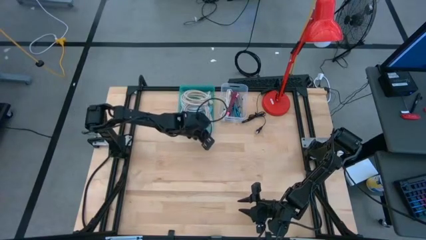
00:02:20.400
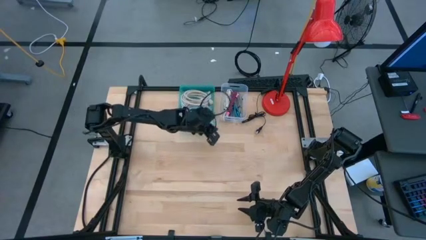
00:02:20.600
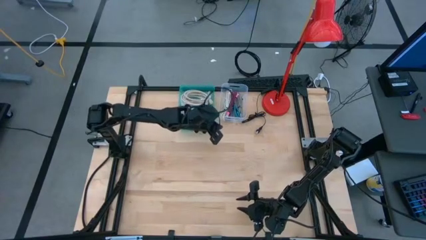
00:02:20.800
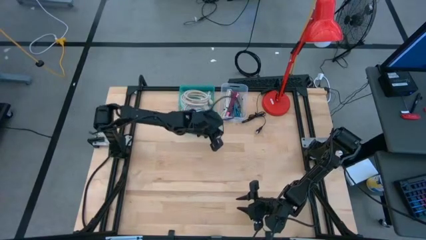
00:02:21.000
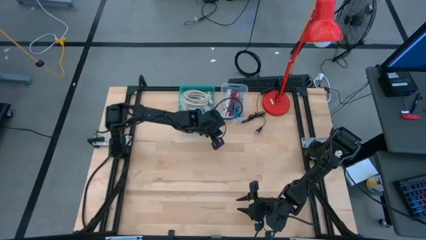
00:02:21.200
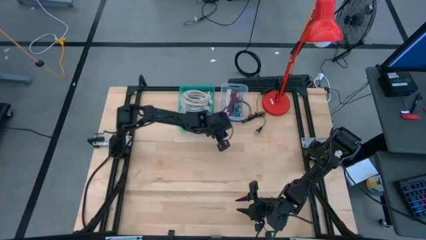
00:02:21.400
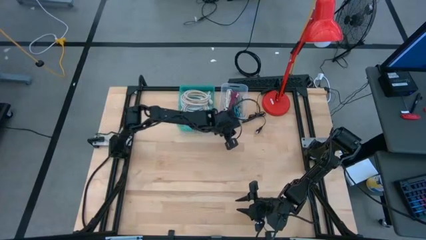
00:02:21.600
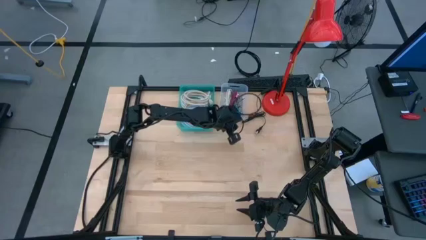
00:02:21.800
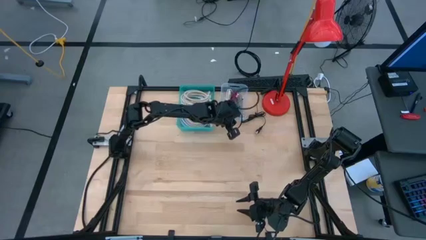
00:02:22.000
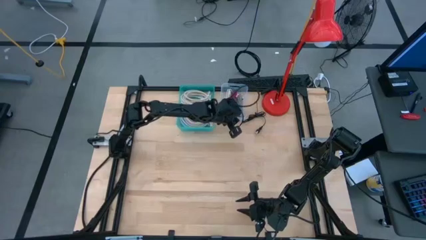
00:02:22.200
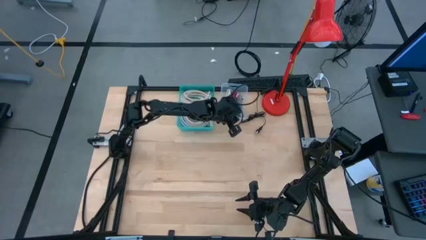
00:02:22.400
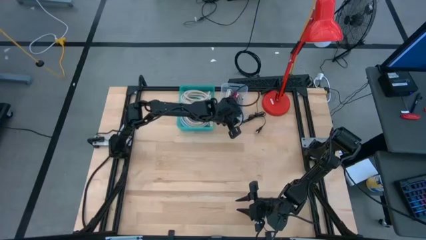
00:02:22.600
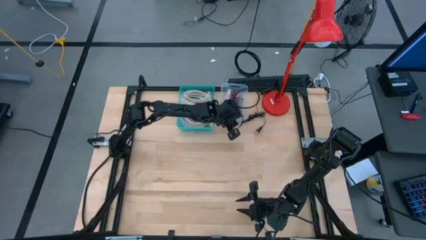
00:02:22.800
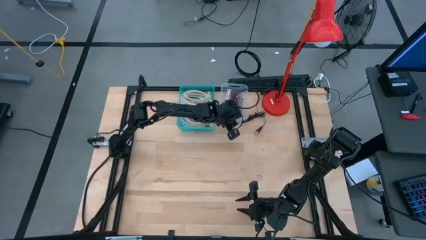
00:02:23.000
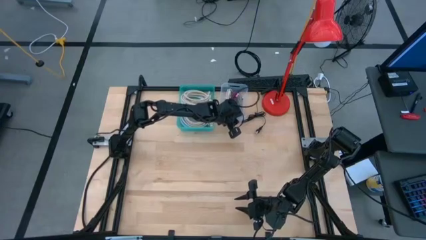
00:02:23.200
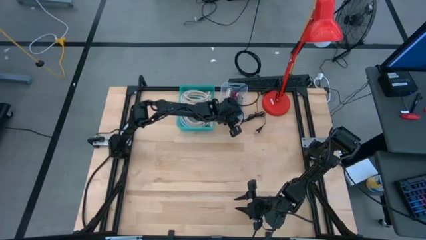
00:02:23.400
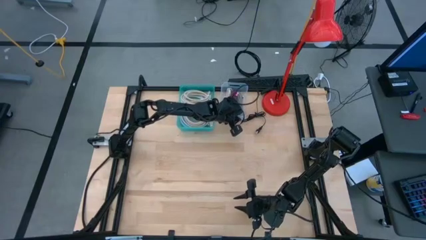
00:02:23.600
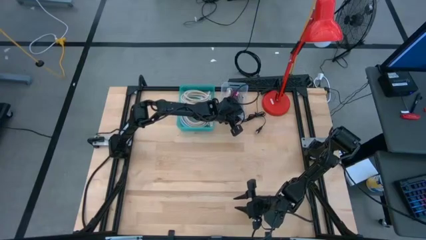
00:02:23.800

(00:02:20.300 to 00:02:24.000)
Task: Pick and place items into bin
Adjust the transparent bin

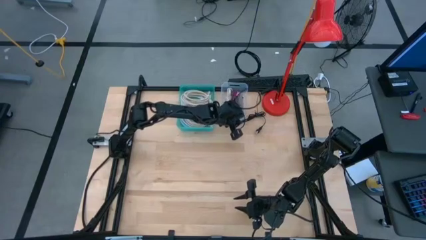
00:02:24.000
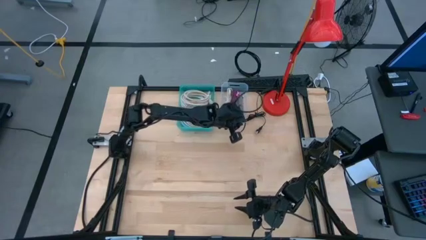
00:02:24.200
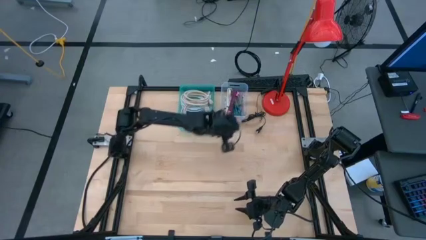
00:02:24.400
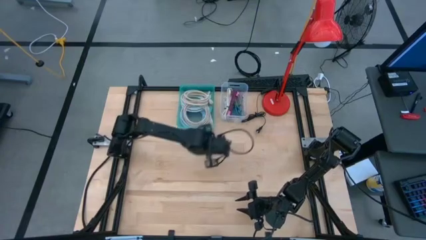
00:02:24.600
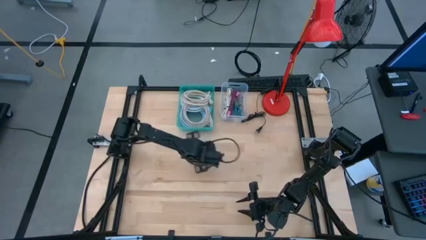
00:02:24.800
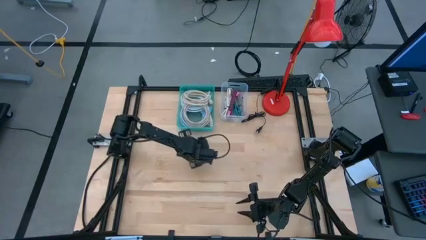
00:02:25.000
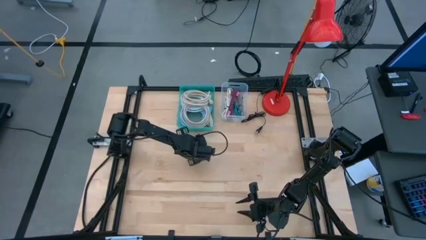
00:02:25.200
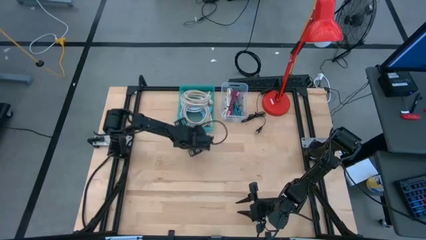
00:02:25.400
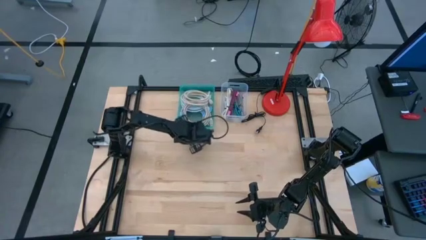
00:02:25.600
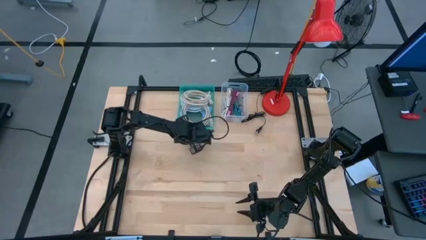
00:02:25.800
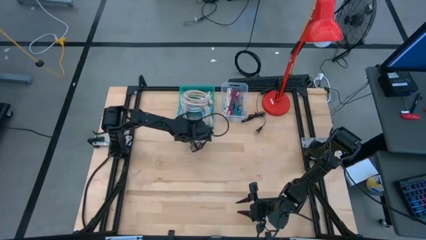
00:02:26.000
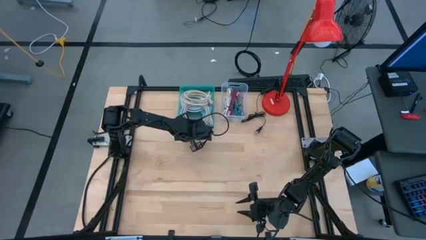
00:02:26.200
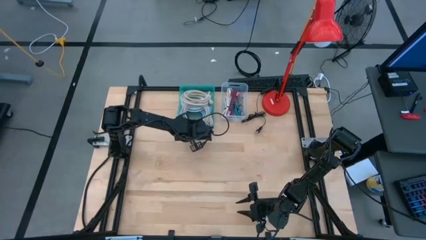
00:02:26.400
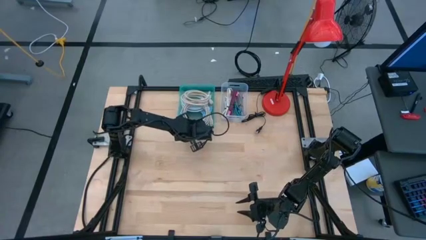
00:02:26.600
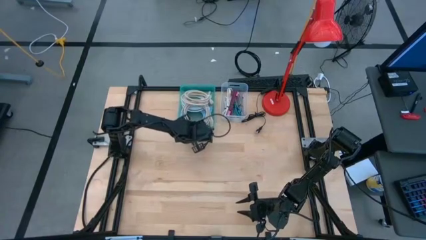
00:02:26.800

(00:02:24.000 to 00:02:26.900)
Adjust the green bin

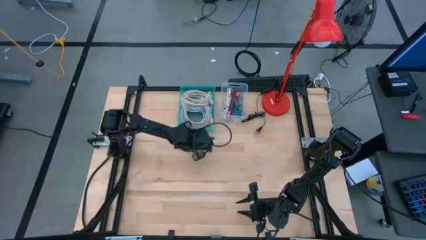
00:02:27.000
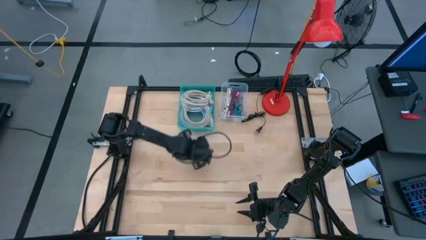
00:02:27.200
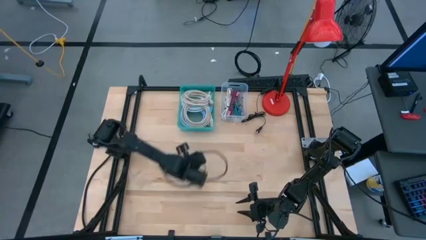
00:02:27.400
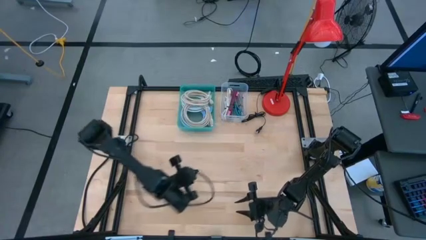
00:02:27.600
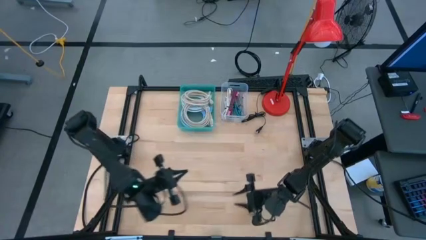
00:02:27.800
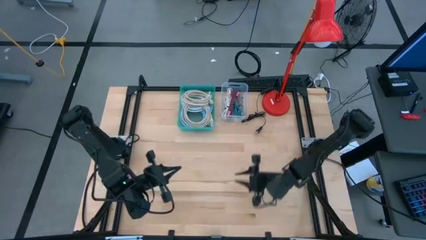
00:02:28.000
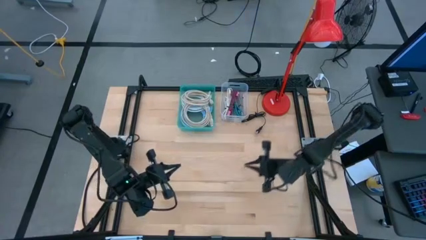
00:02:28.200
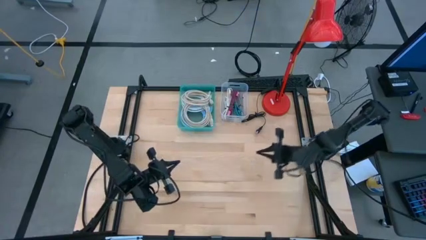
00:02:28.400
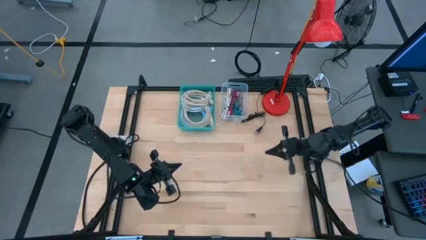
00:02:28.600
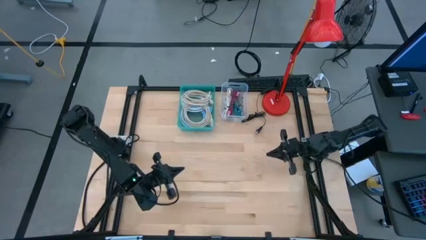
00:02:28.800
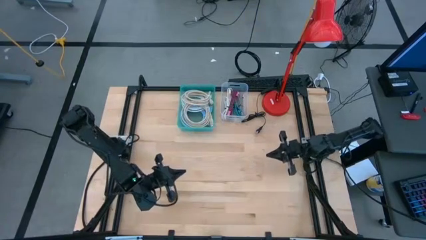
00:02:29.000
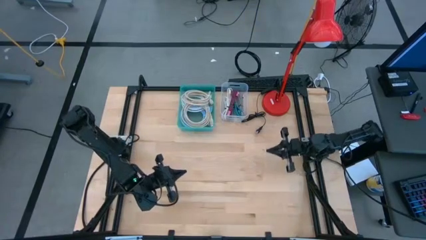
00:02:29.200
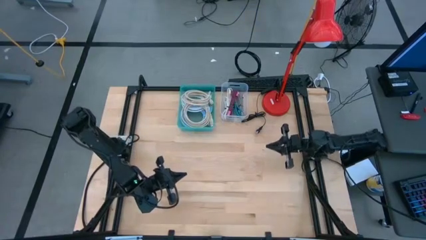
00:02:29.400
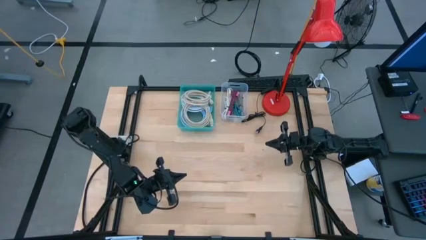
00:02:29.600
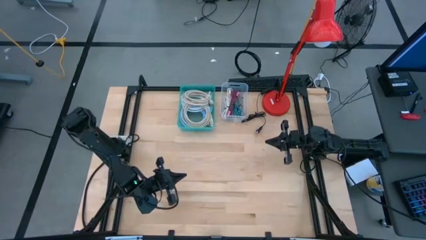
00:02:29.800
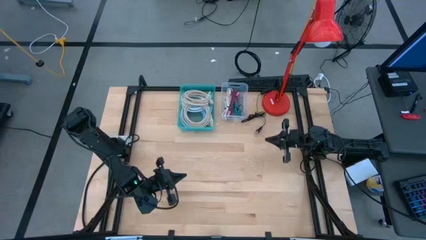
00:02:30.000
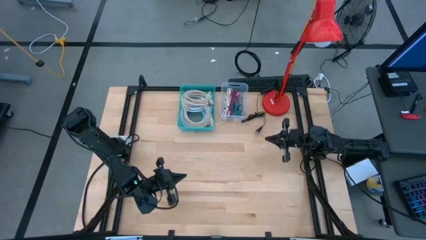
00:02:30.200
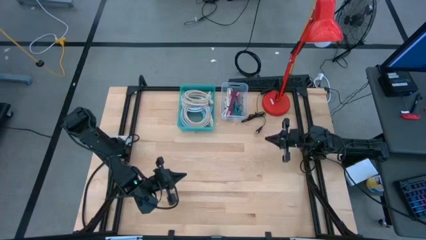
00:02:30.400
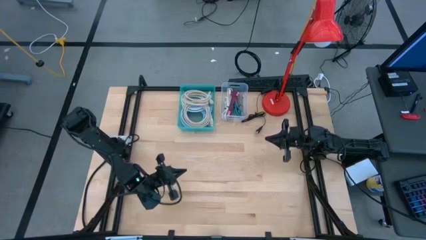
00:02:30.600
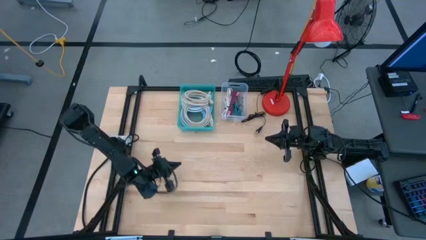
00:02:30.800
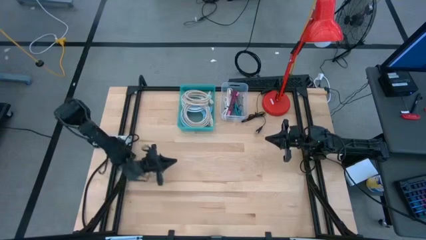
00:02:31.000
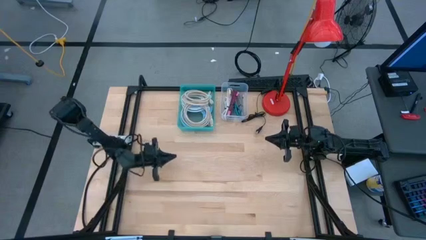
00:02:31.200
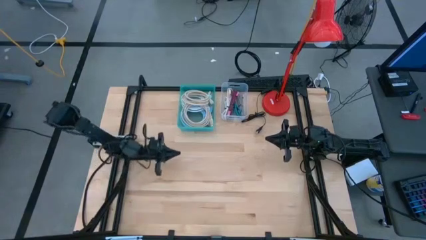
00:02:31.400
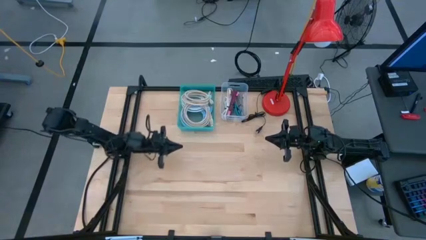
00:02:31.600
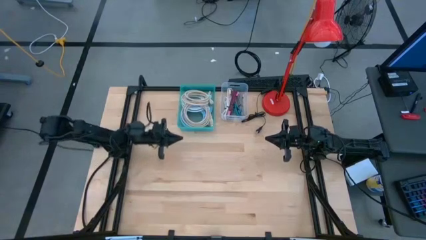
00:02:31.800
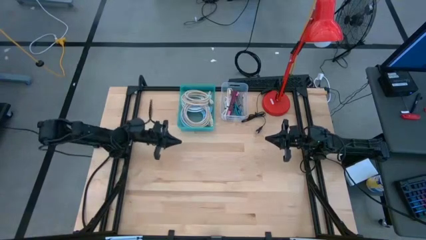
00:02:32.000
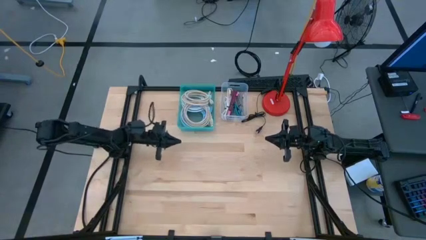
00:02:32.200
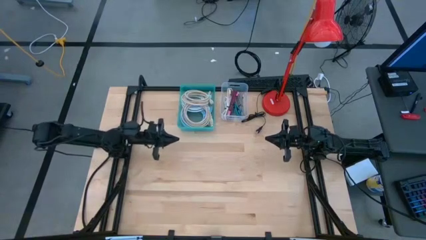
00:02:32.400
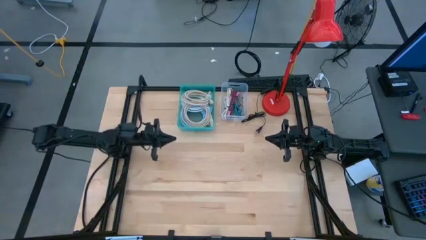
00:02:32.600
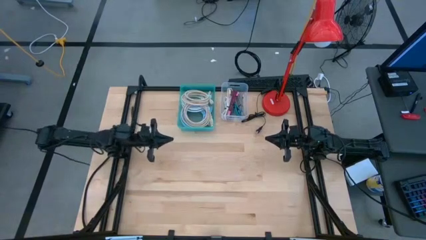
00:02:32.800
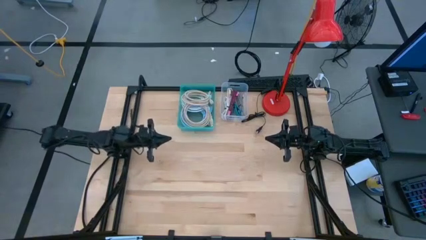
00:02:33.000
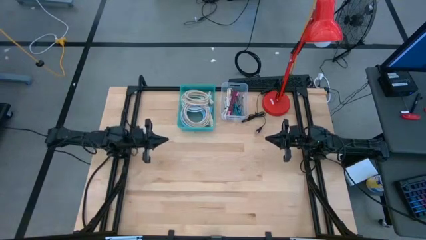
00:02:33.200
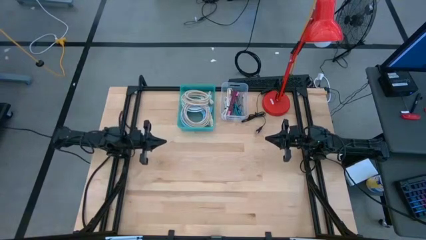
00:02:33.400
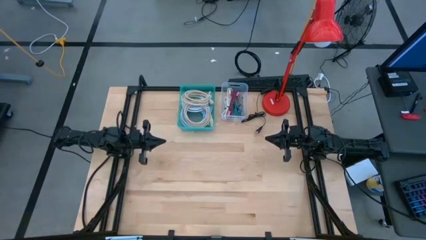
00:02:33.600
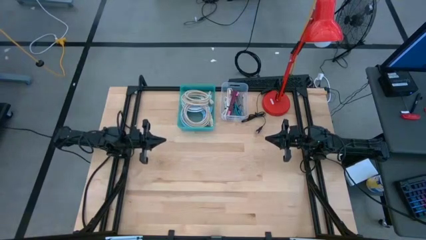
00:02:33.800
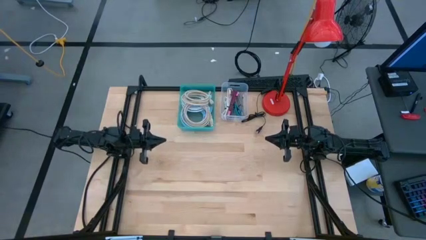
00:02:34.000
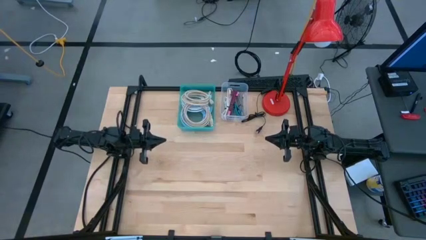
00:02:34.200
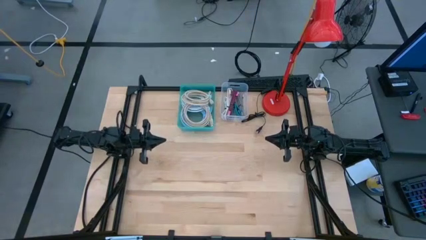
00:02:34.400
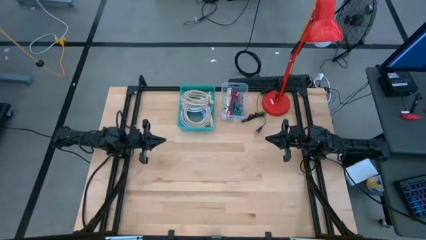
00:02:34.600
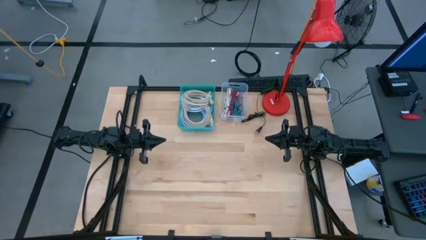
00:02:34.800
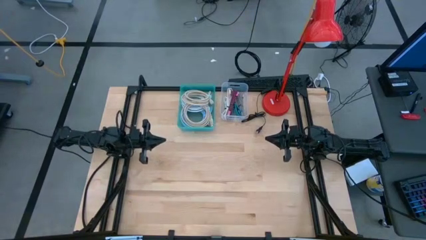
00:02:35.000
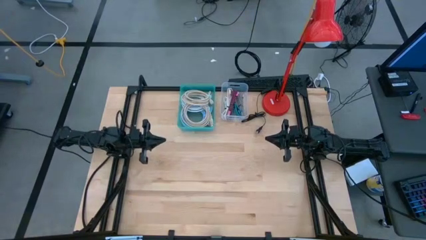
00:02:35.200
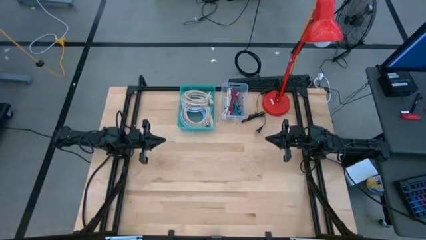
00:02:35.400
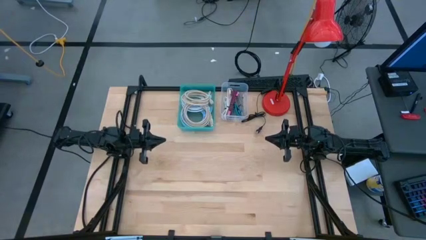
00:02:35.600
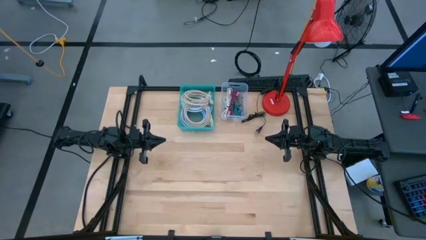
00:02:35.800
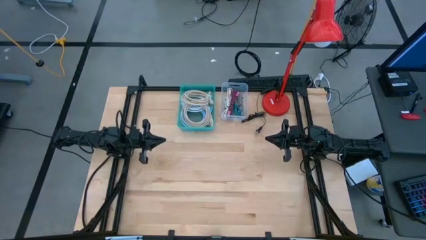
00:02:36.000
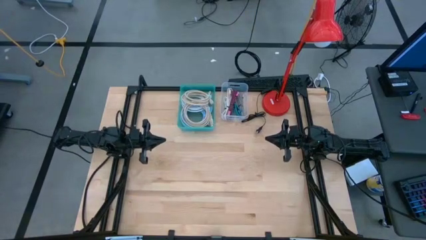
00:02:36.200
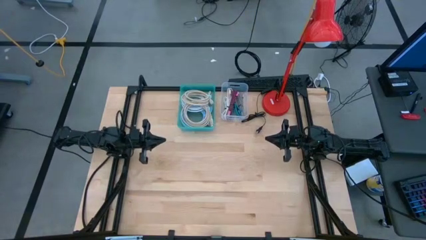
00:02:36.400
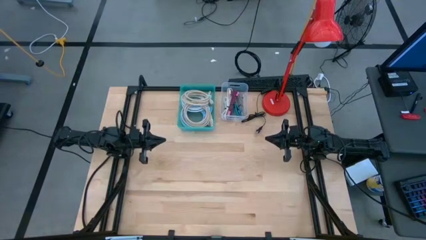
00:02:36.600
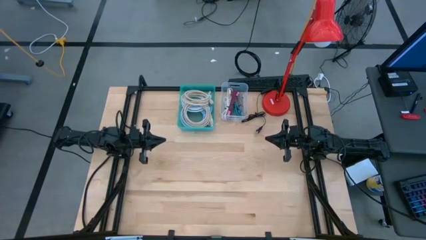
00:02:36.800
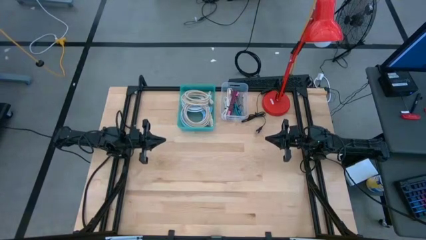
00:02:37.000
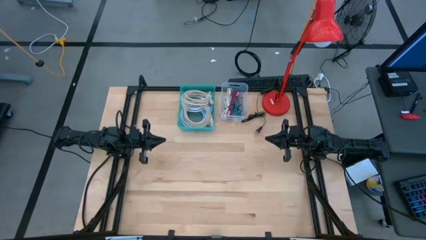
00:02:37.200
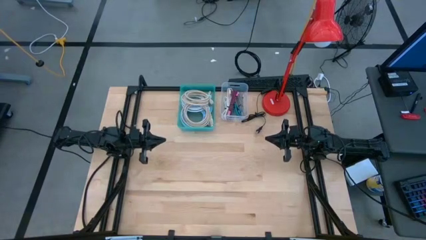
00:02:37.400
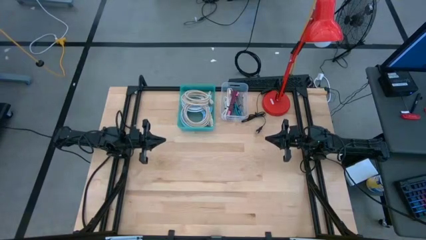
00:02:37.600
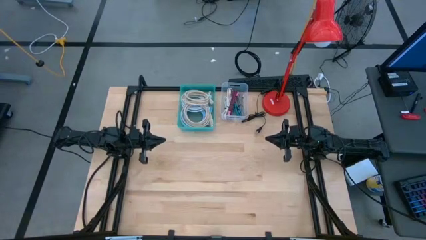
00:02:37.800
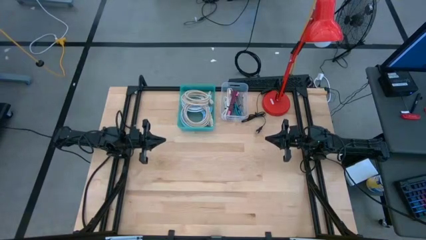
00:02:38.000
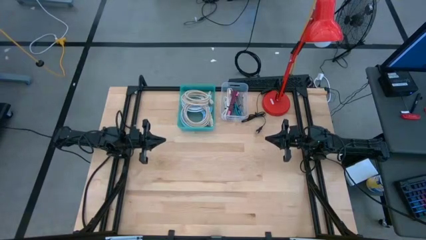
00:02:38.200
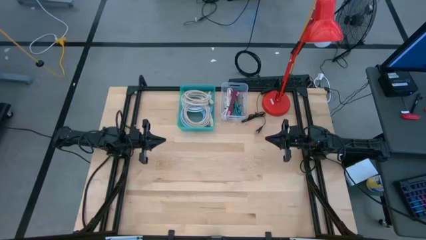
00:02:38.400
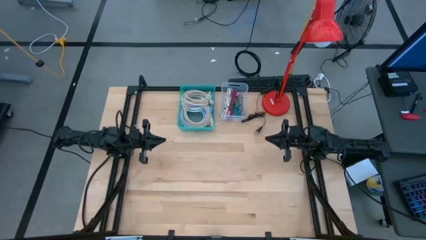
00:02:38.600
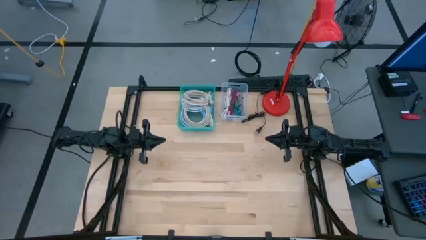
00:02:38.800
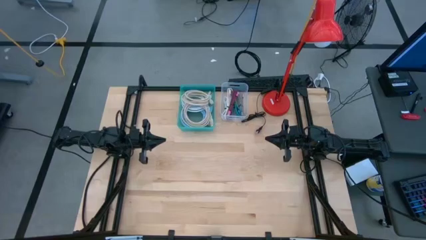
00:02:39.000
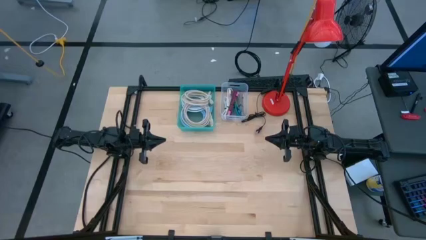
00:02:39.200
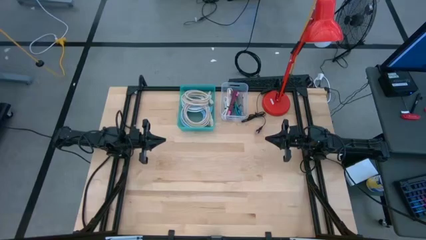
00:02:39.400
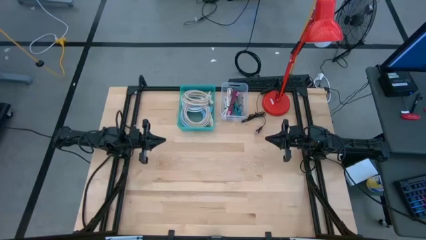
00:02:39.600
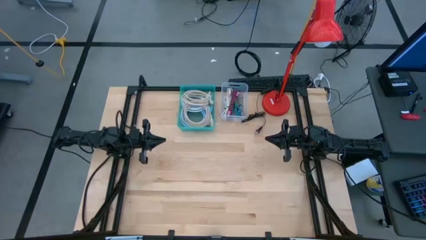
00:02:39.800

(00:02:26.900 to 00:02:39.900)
Return to Home Position
